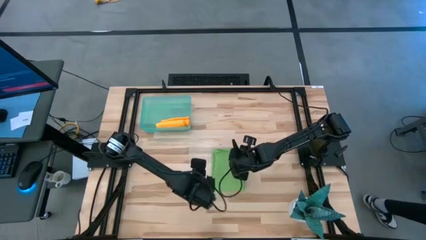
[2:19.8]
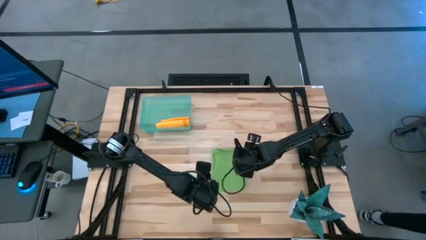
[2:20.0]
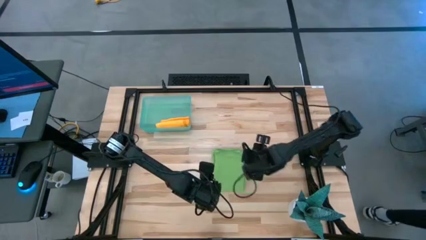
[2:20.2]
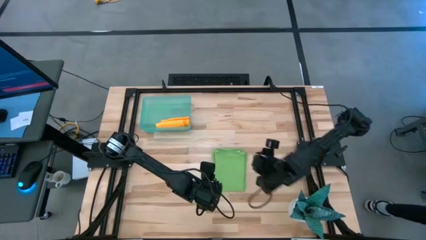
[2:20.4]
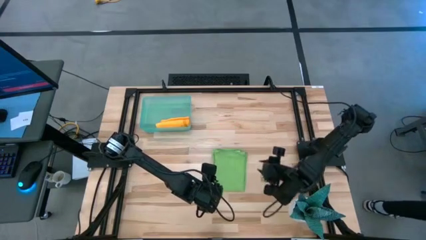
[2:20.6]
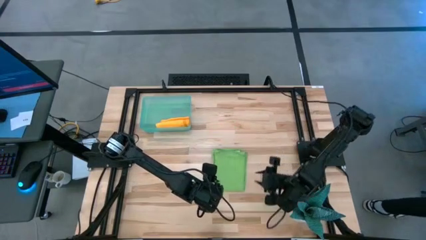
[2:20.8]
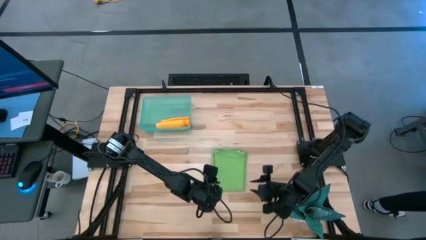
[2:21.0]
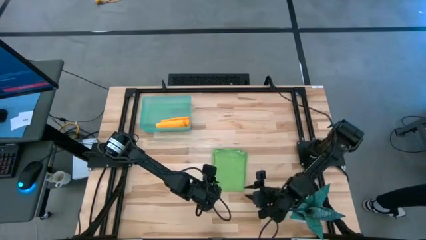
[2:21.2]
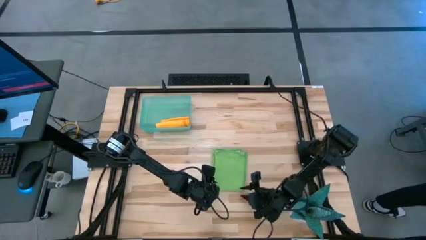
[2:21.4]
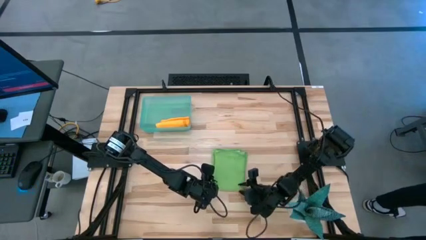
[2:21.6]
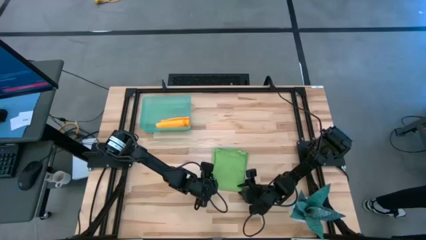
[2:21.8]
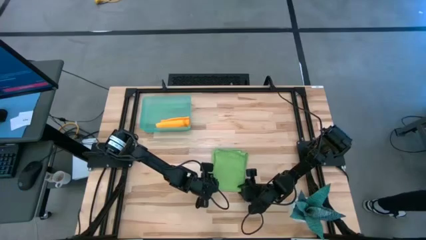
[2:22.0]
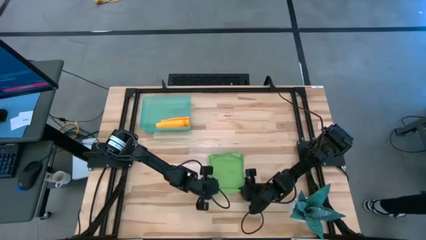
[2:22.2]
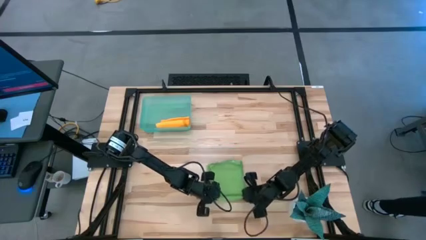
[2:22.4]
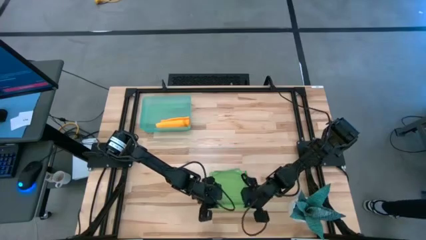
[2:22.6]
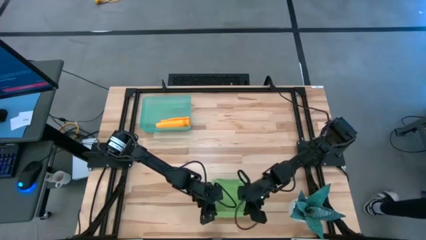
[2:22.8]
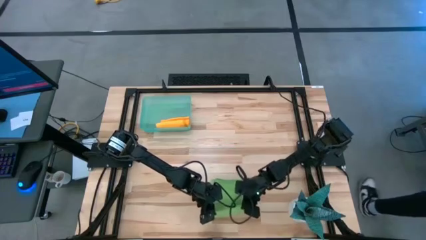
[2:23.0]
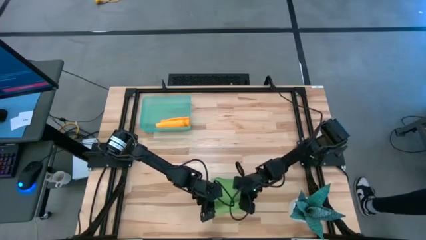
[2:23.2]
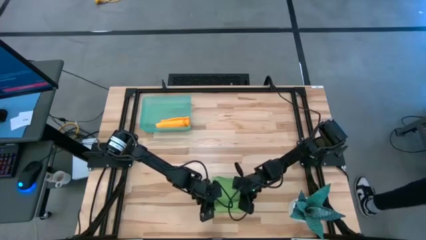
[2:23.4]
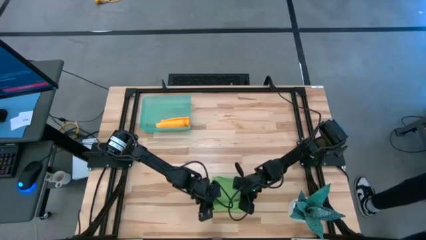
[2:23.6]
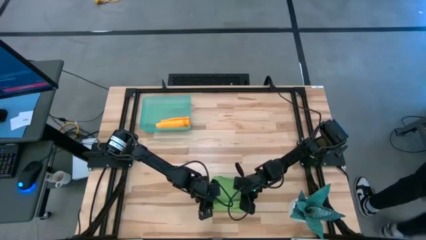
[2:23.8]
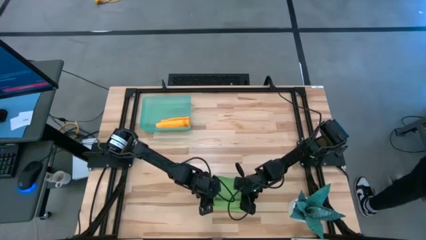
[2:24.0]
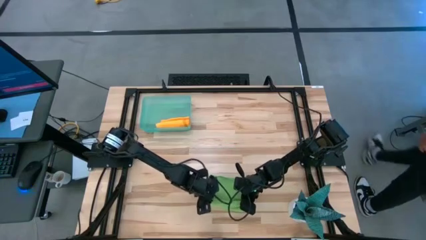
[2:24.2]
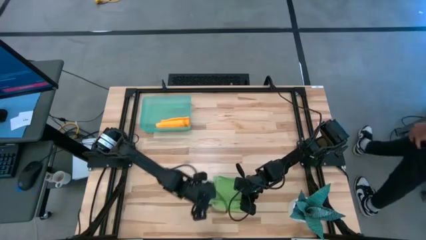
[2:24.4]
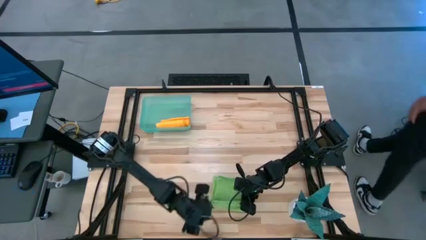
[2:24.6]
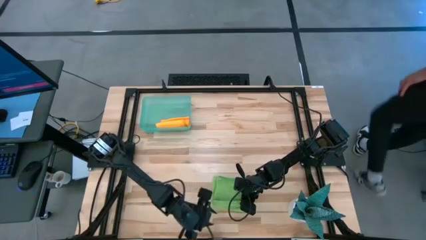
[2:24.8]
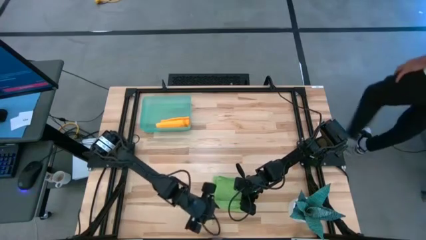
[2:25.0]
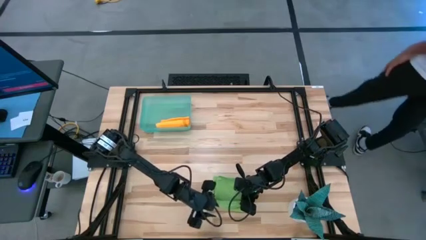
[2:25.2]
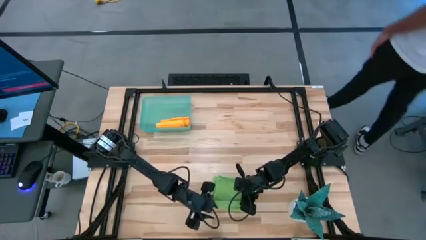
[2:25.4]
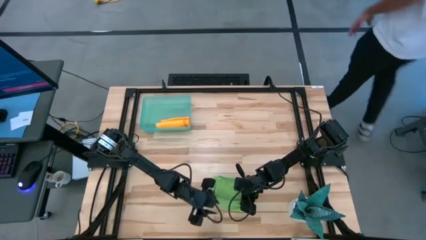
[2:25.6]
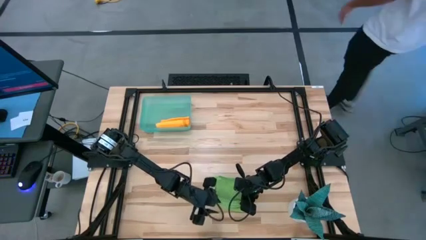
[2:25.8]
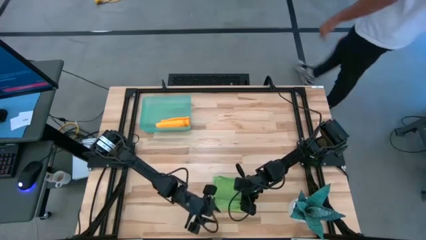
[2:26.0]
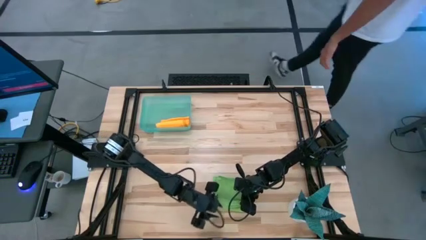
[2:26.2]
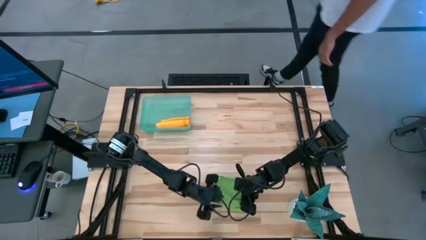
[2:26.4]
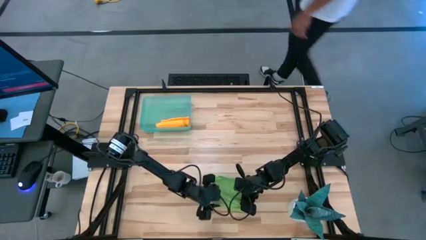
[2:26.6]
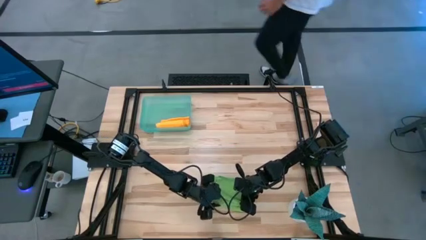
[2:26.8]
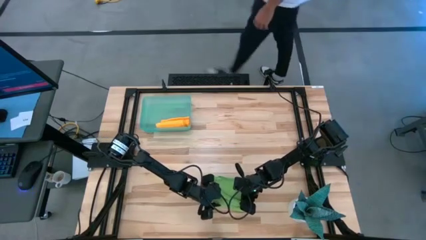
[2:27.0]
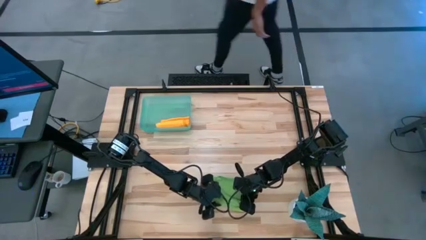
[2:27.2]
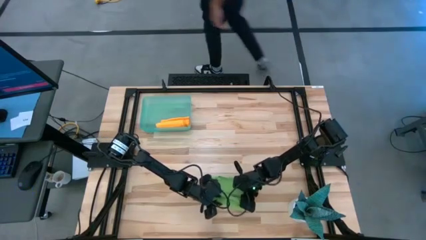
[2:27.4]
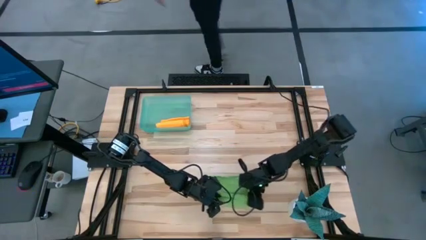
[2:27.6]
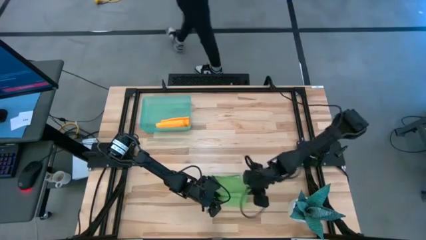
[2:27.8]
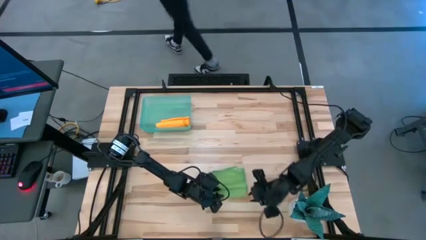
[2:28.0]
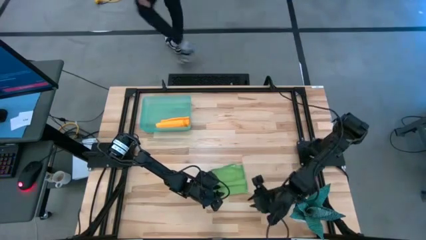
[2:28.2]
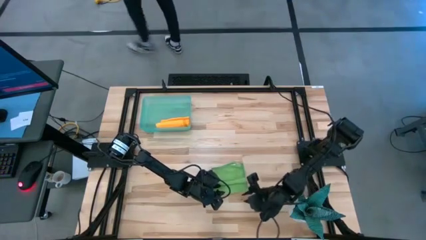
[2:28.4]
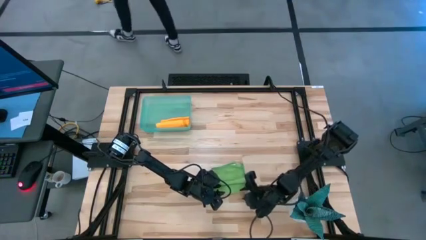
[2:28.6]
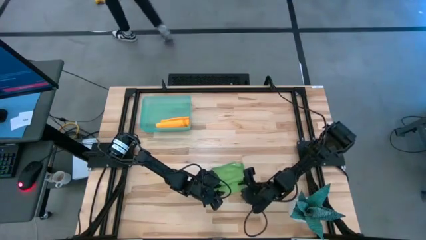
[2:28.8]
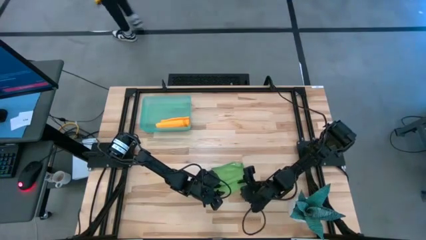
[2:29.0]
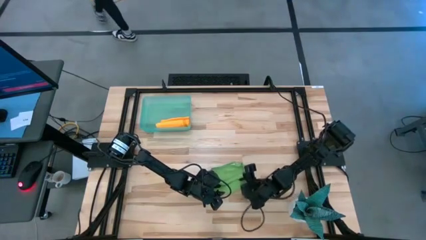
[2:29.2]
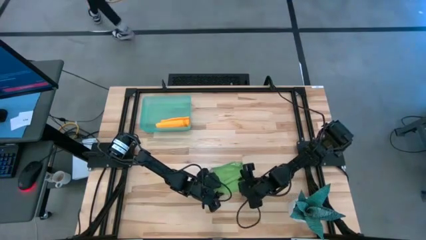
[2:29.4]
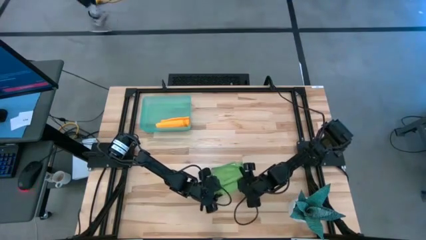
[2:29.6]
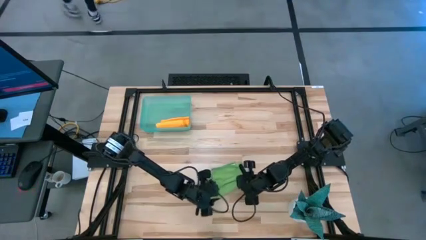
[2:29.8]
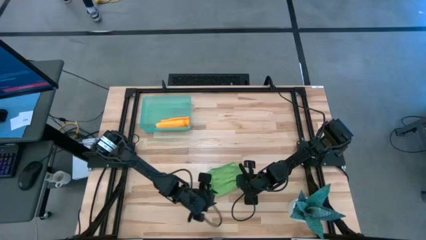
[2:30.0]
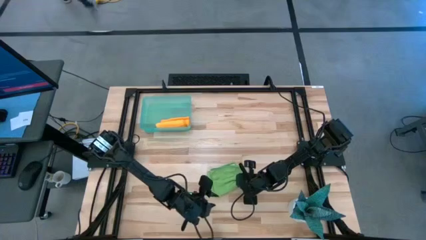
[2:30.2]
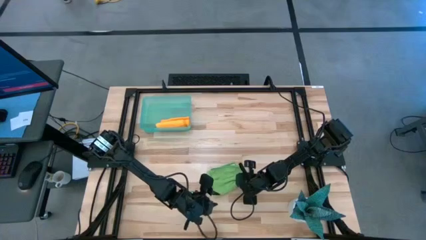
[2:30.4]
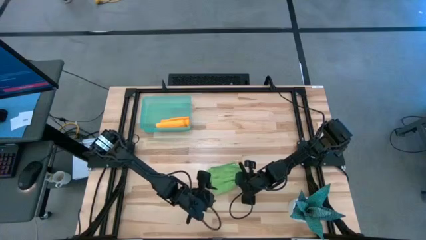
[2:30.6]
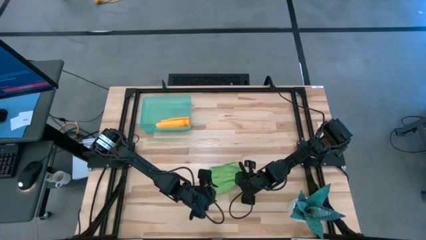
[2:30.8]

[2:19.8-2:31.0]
Task: Roll microfiber towels into tight, uniform cylinder then place into a basket
Roll the green towel

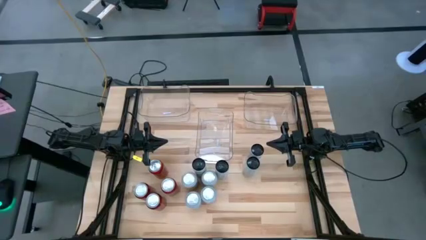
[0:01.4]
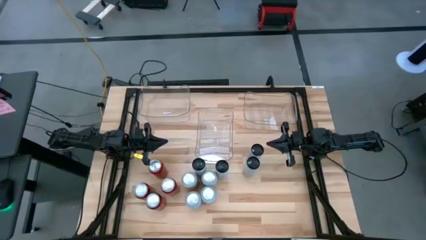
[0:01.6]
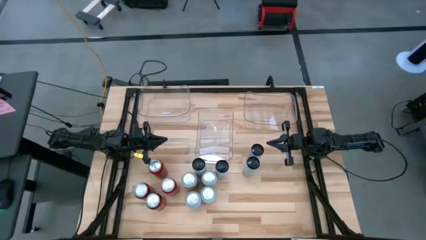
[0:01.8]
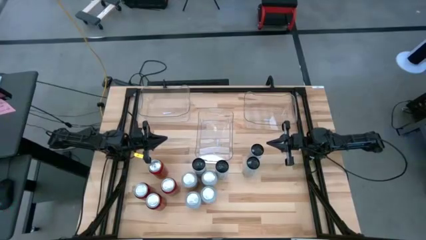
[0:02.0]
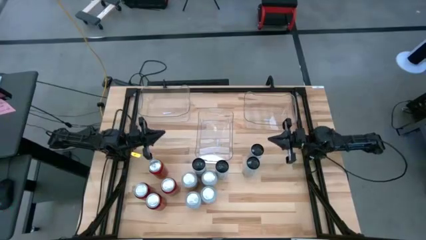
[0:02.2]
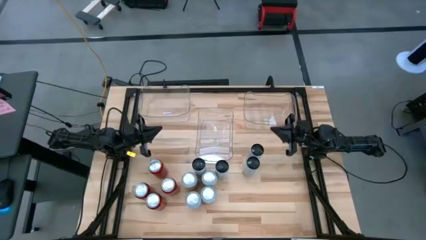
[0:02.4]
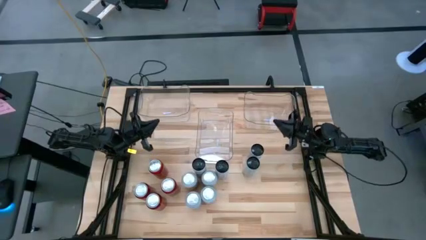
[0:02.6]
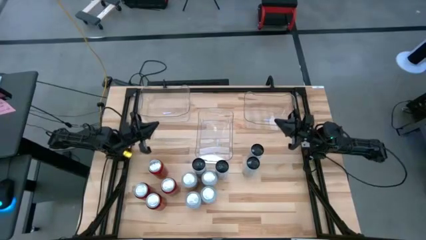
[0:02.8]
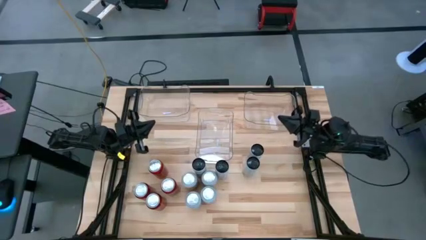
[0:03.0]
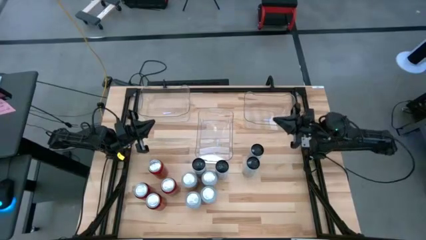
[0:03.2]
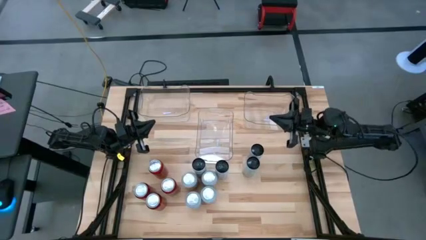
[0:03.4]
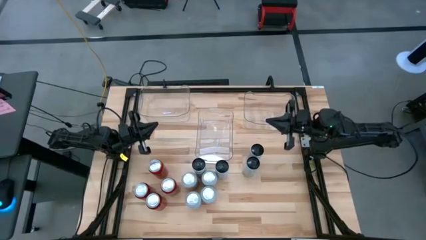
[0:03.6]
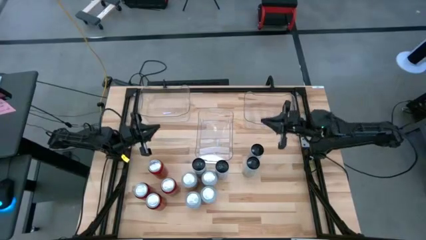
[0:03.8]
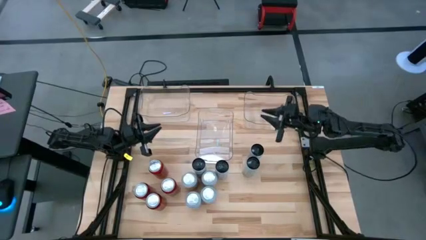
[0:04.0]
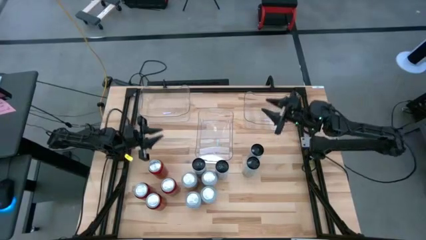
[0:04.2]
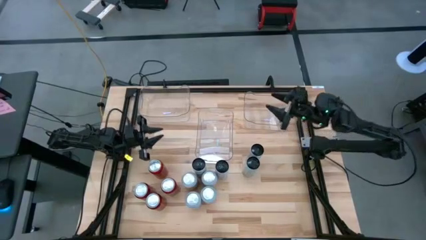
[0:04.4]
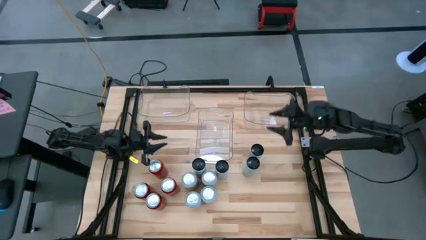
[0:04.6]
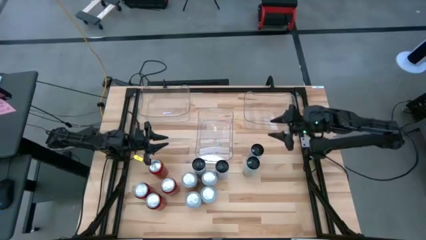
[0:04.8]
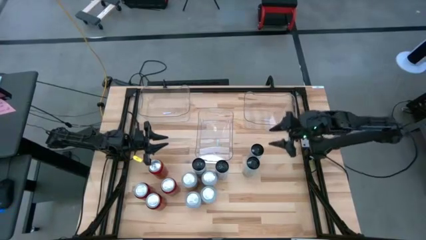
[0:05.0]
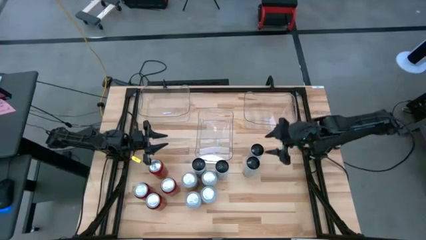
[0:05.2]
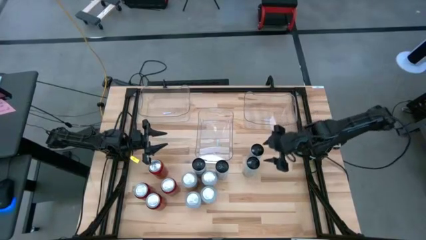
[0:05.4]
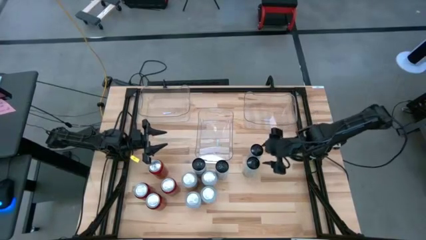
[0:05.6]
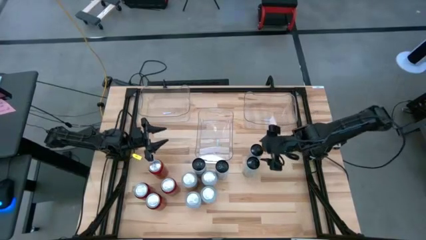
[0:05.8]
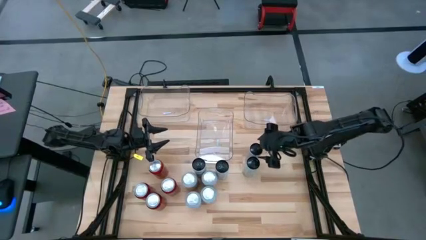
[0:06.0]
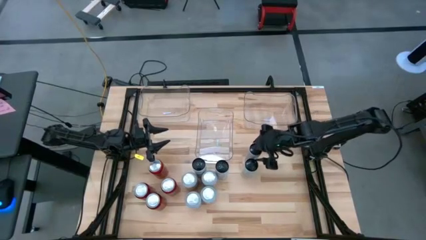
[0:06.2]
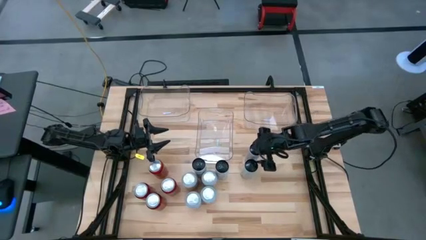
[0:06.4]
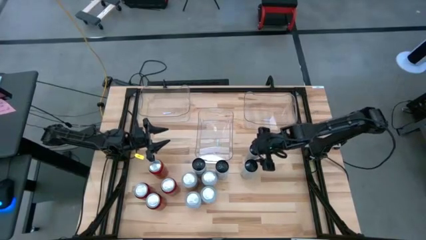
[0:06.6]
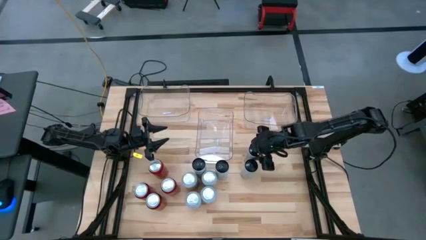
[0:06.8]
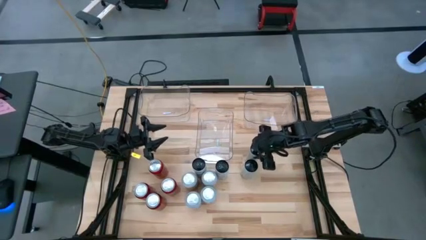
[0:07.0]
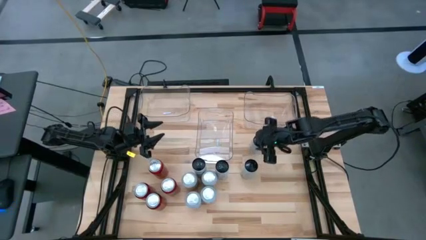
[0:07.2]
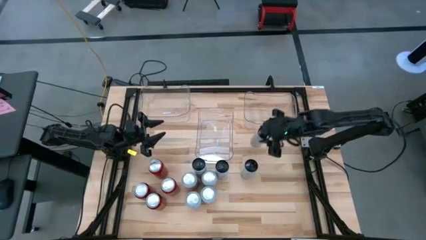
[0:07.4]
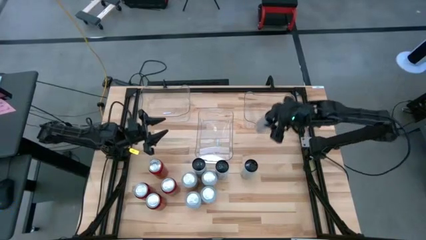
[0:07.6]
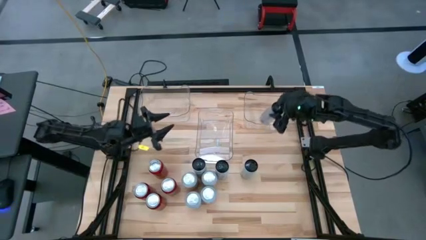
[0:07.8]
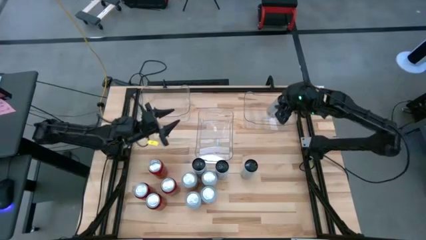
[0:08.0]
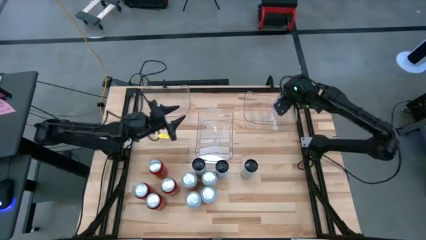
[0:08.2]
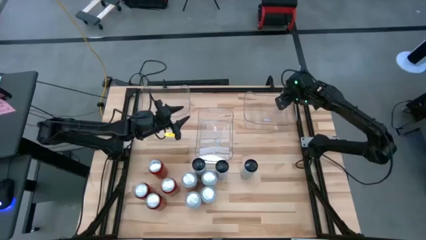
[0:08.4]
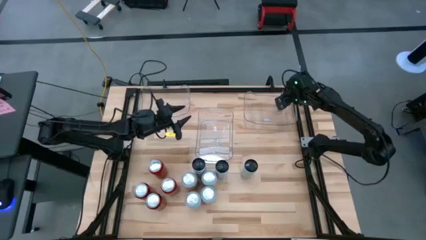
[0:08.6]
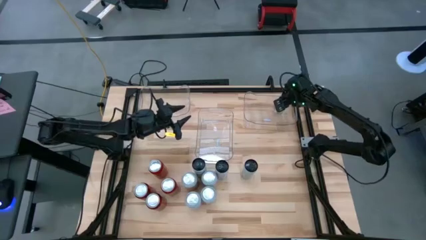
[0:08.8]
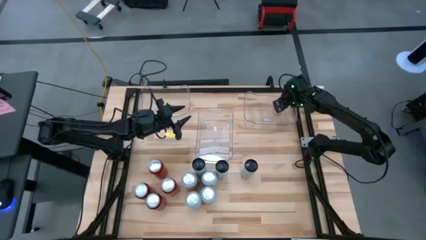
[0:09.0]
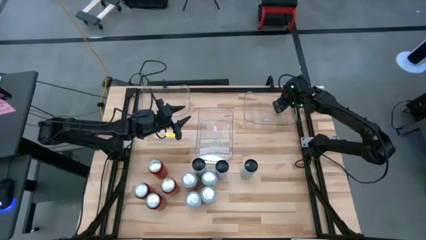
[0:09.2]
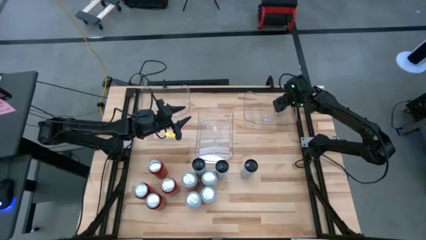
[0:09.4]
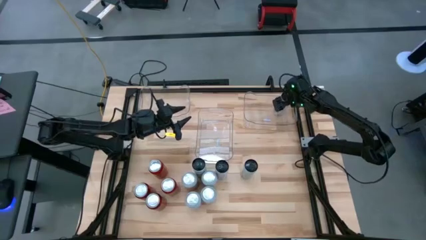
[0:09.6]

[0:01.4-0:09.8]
Task: Sort soda cans
Put the top black and white soda can in the right transparent bin
